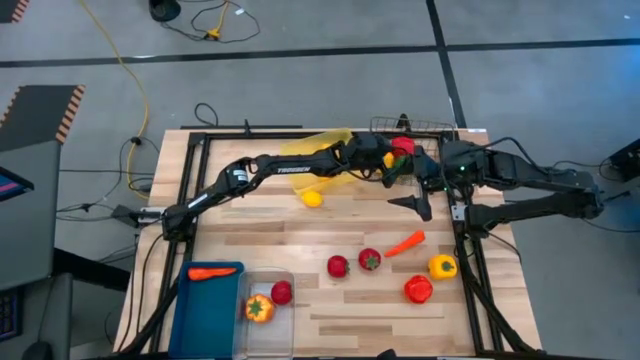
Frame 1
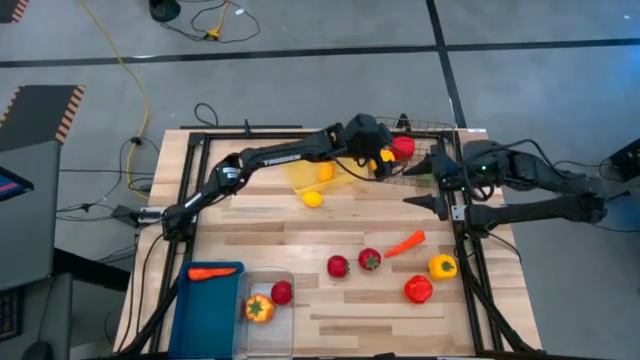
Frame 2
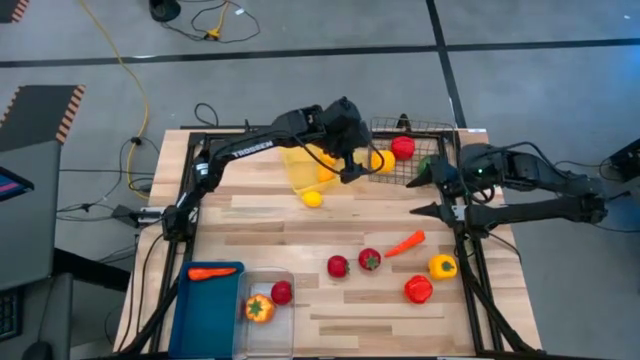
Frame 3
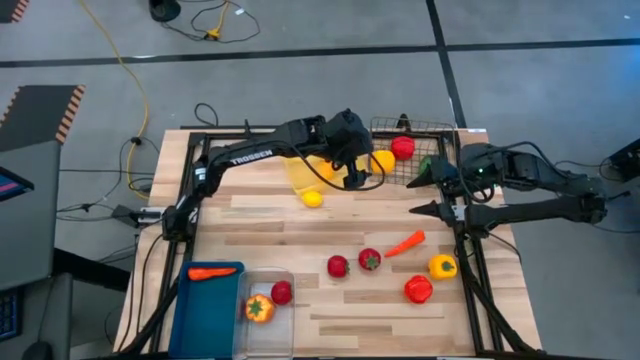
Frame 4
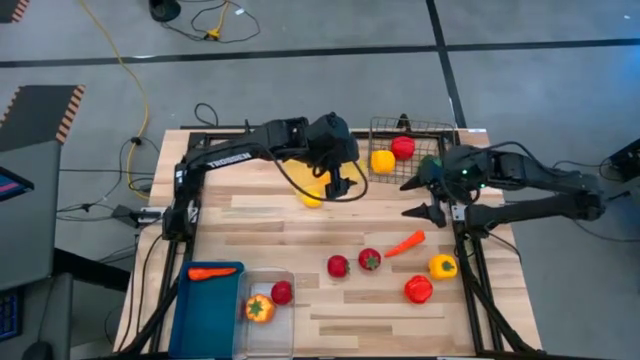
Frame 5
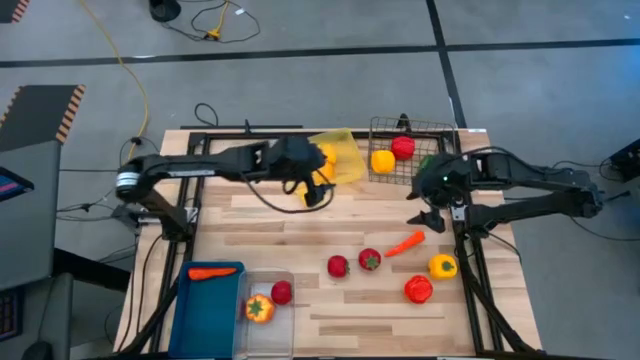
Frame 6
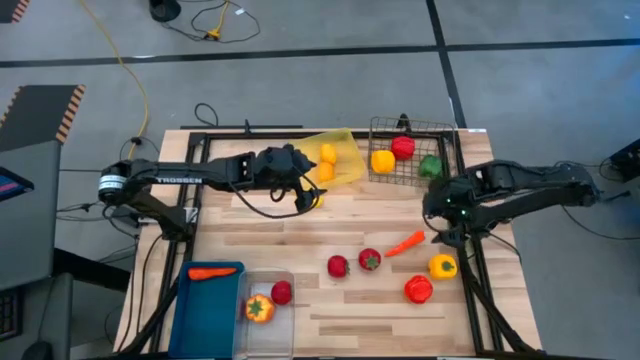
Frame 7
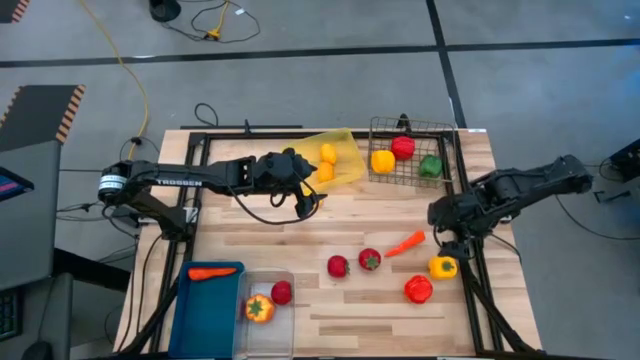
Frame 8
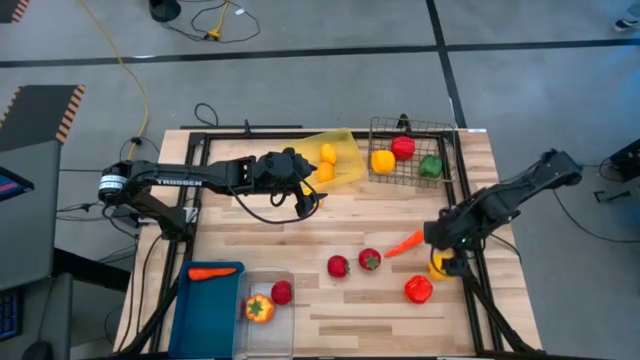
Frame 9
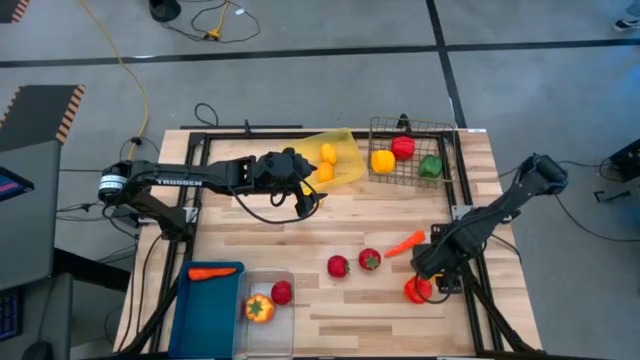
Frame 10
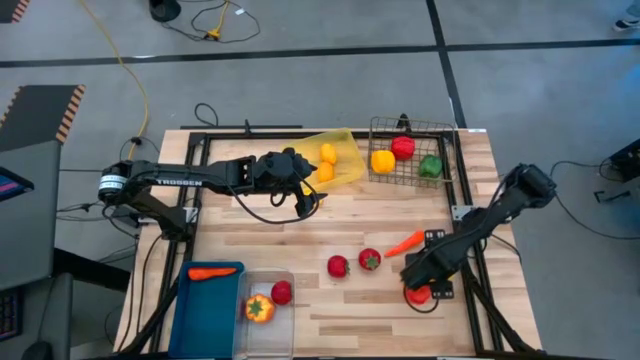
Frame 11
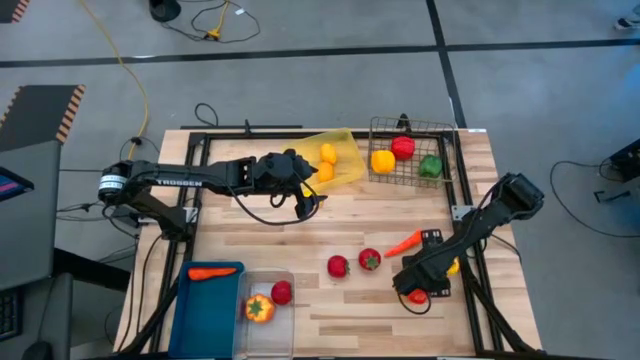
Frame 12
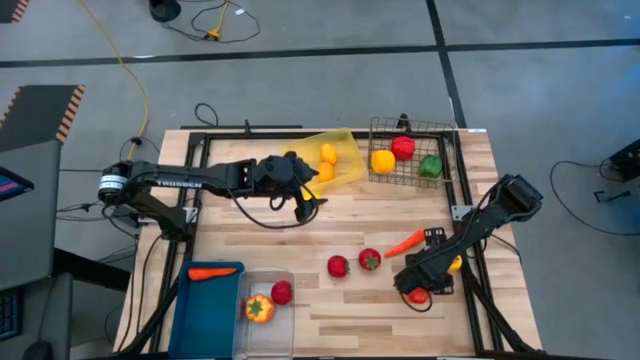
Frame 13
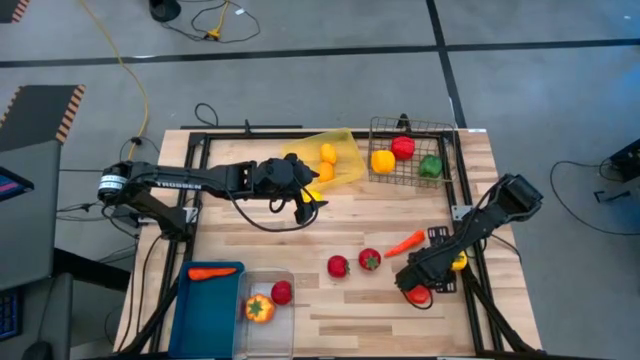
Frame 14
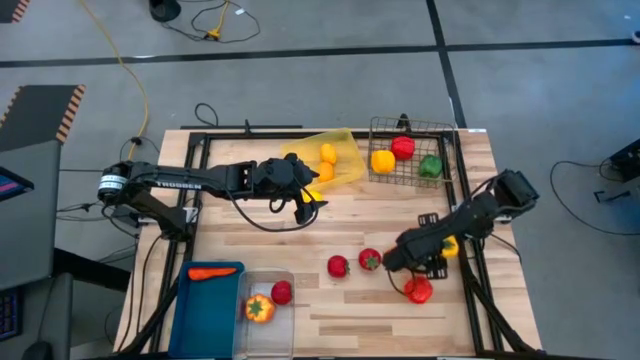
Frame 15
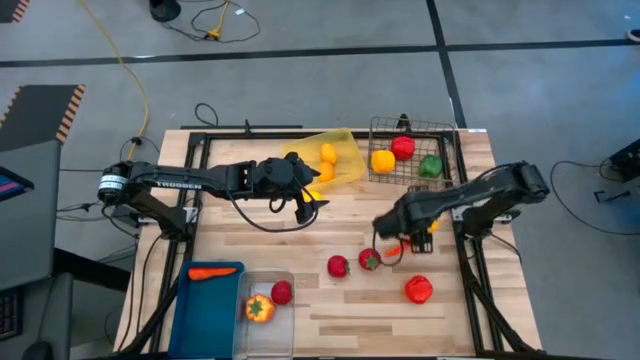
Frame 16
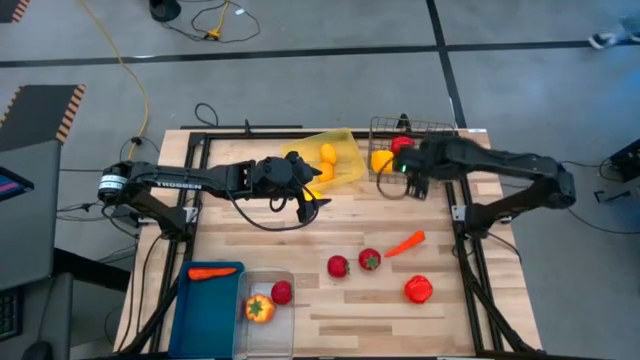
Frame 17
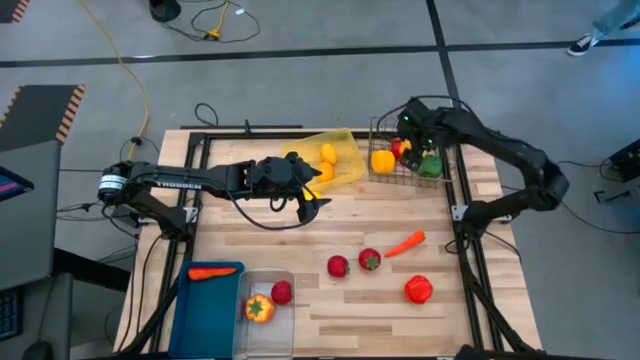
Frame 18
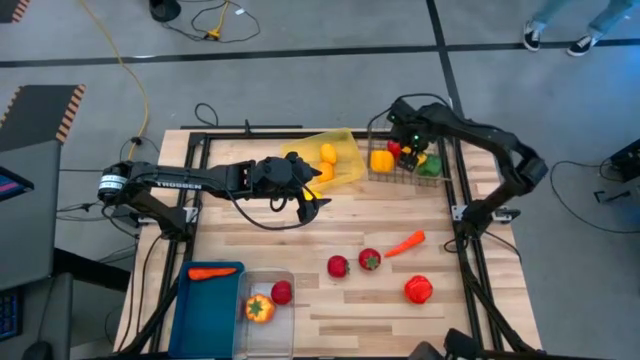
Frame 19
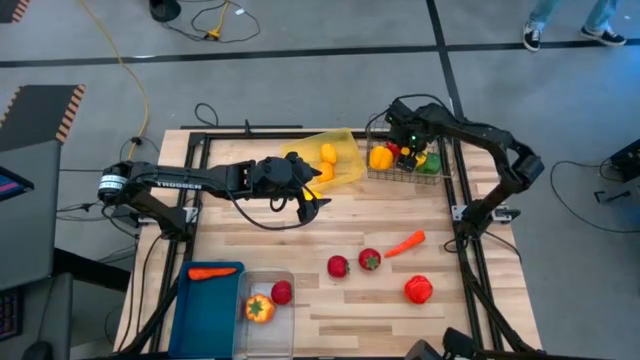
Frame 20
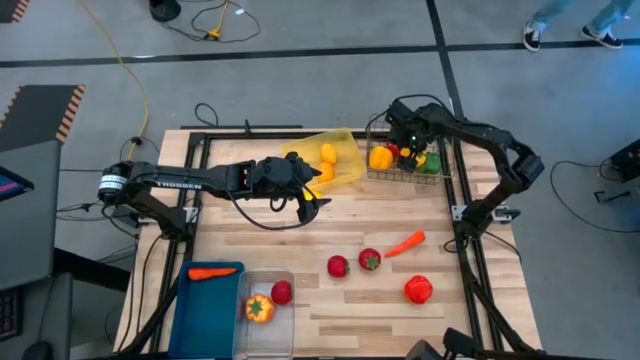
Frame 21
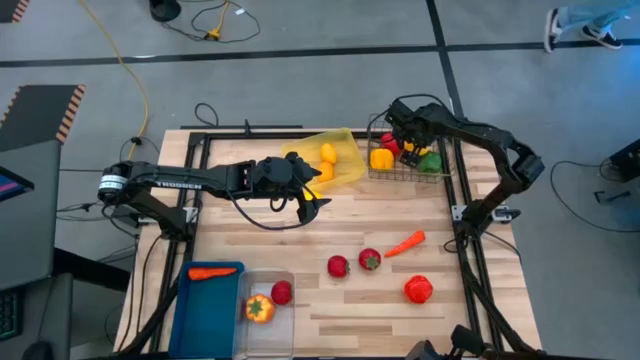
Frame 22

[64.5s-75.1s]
Task: Sort produce into baskets
Put the yellow bell pepper into the wire basket

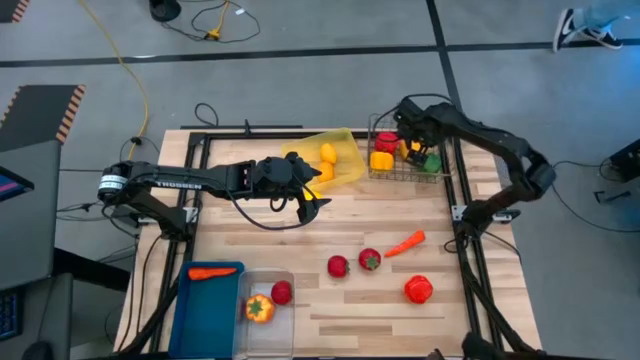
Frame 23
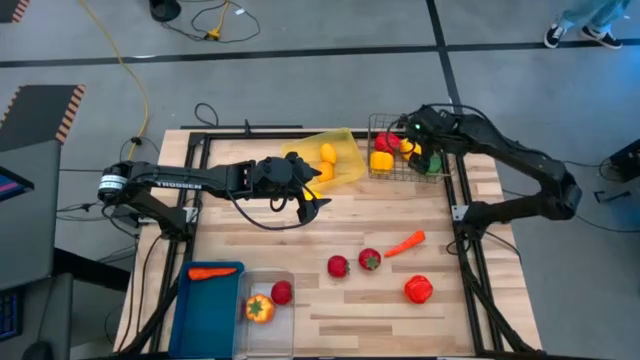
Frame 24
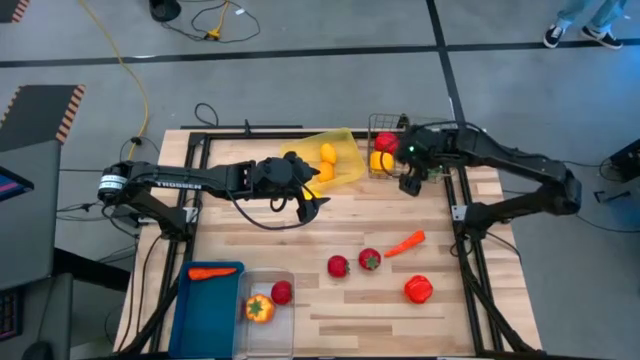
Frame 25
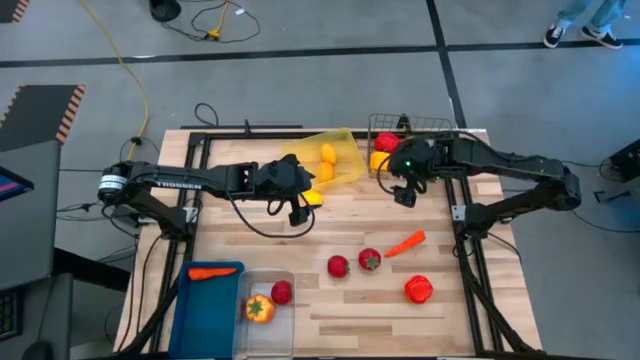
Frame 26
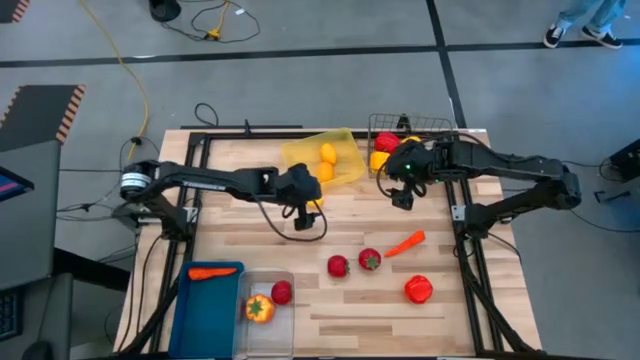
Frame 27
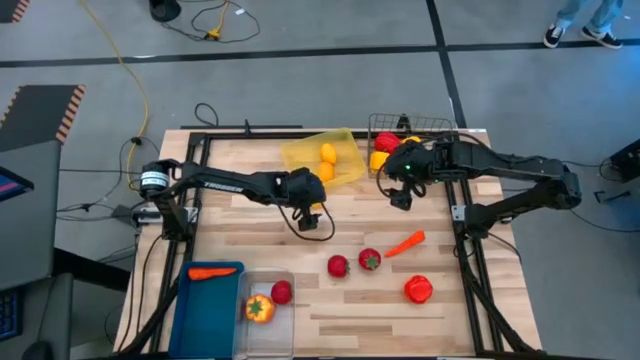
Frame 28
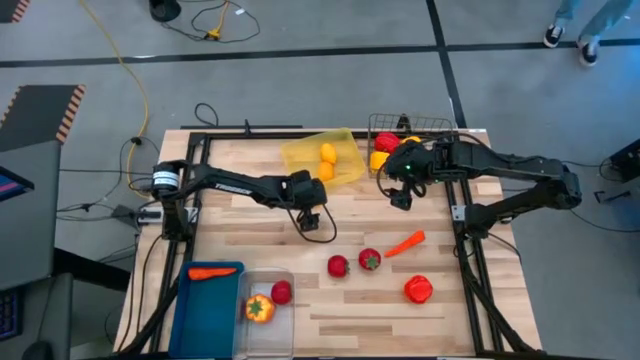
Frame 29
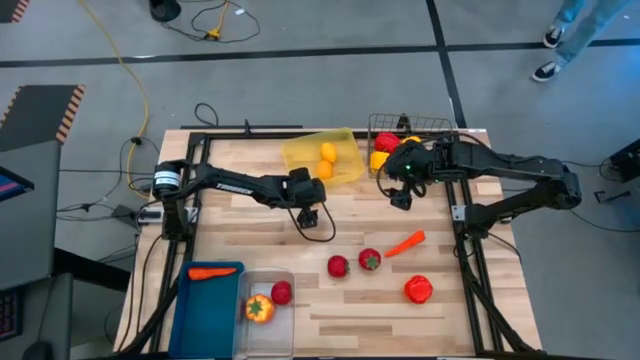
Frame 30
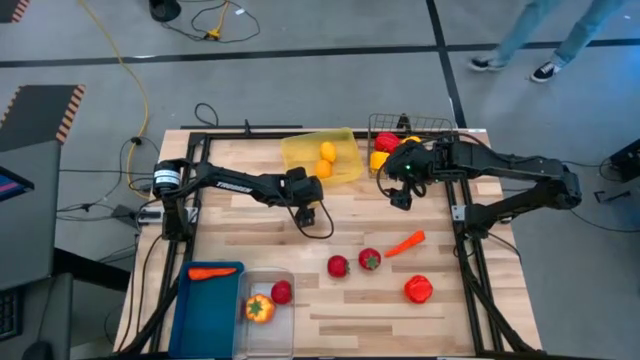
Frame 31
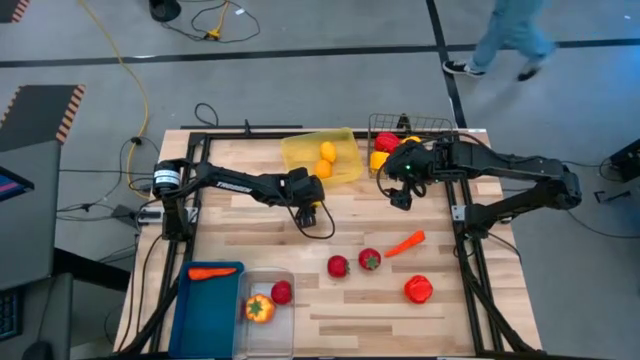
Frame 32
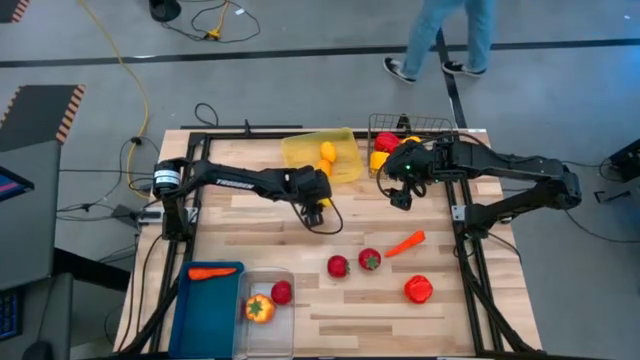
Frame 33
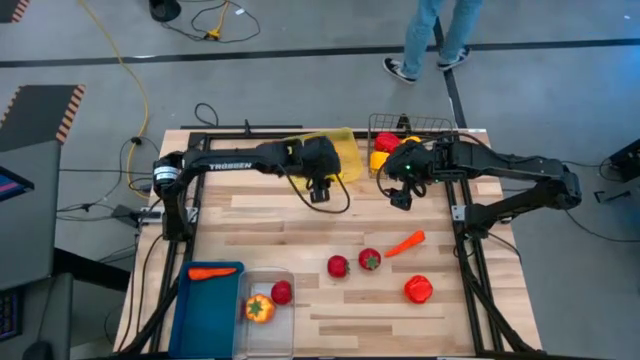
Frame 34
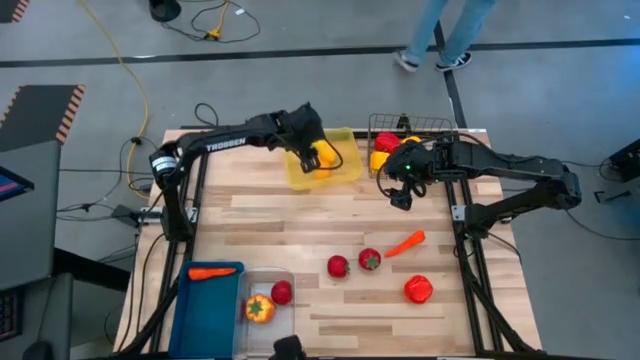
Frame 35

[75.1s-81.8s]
Put the lemon into the yellow bin

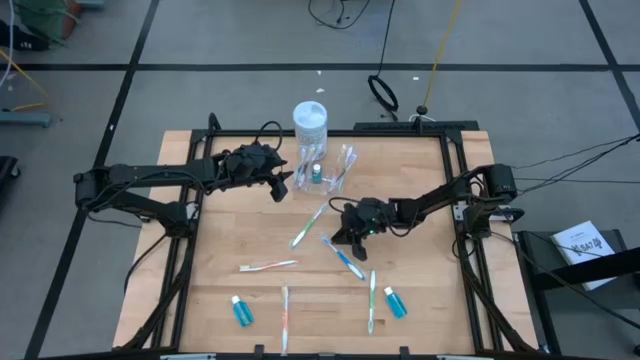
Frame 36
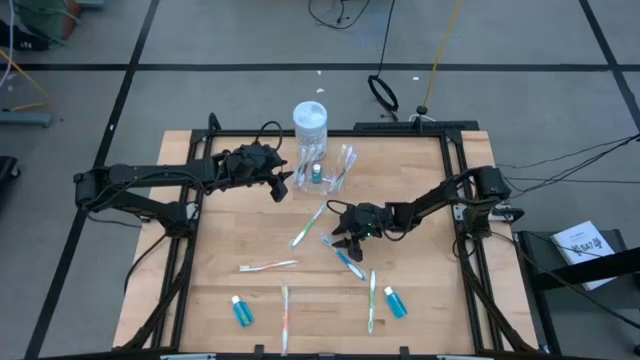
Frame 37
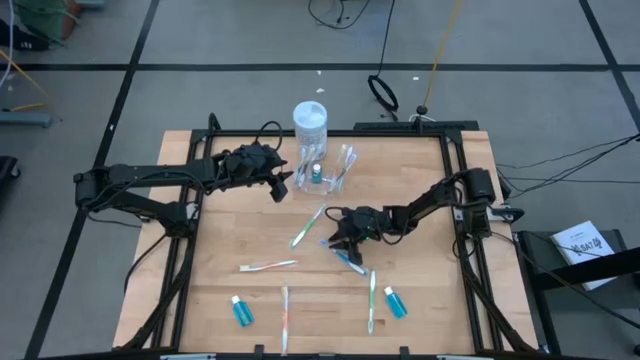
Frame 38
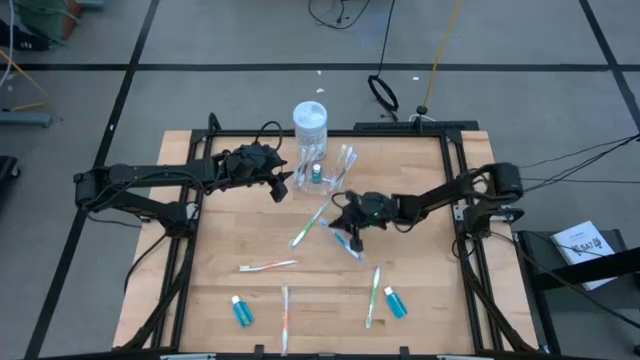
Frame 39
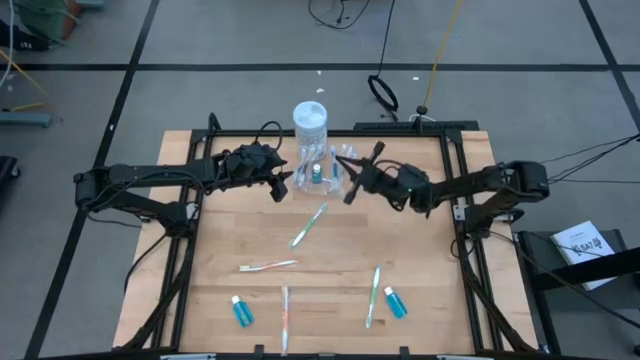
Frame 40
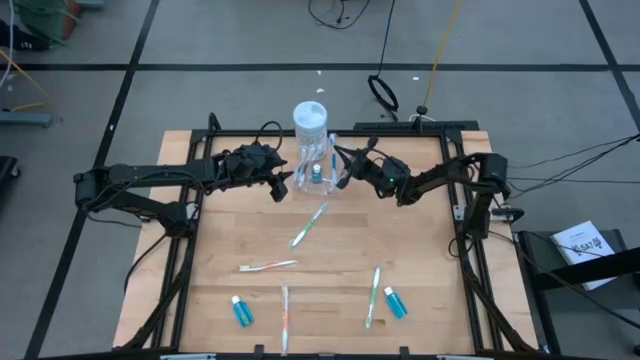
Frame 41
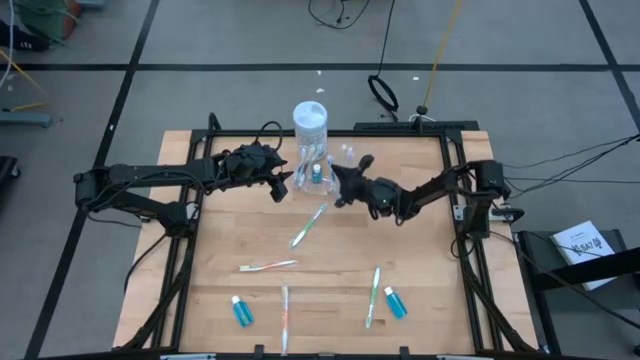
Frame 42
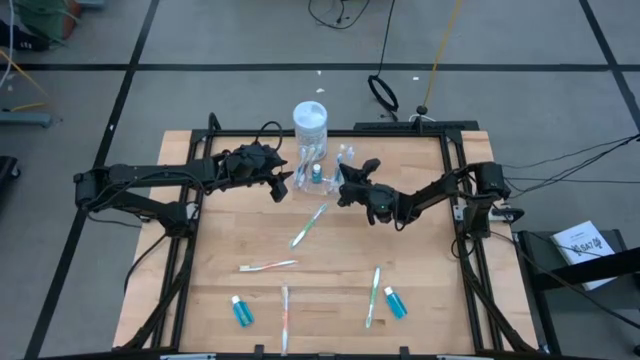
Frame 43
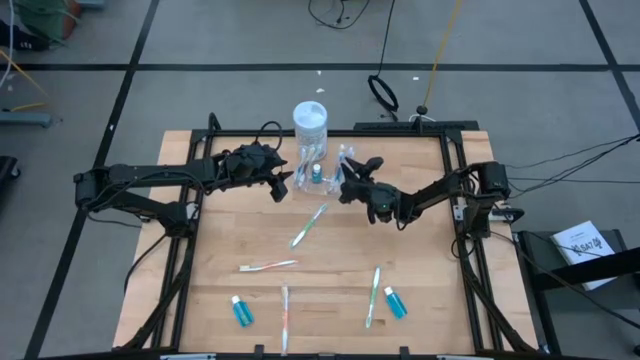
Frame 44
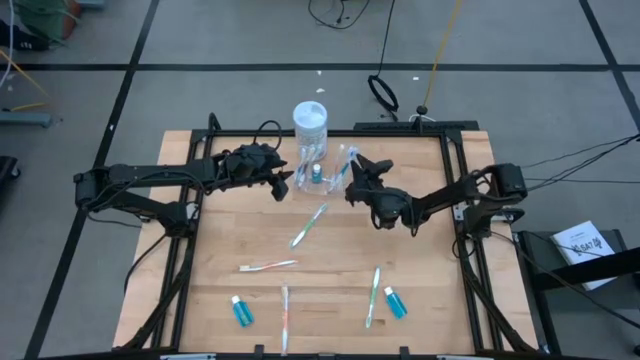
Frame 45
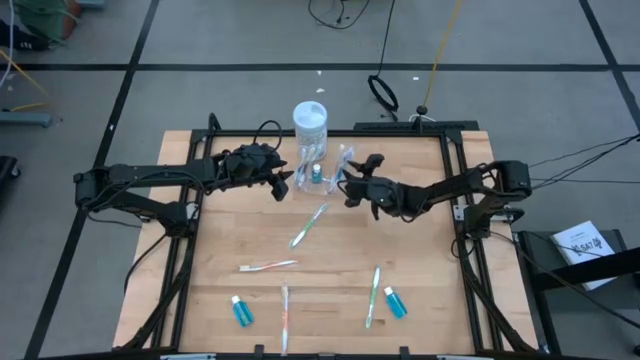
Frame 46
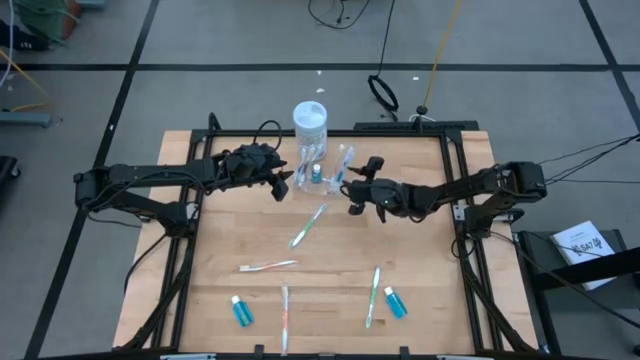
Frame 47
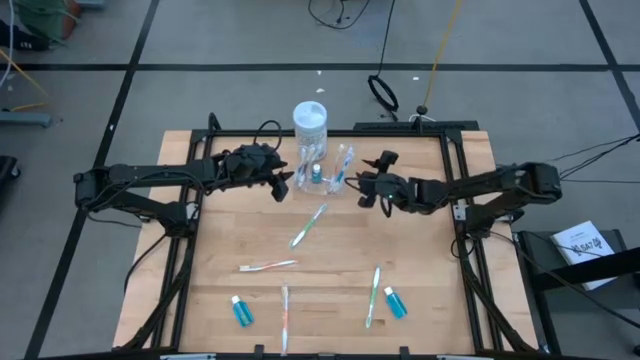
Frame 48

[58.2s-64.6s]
Task: Pick & Place toothbrushing station
Put the blue toothbrush into the transparent organizer
